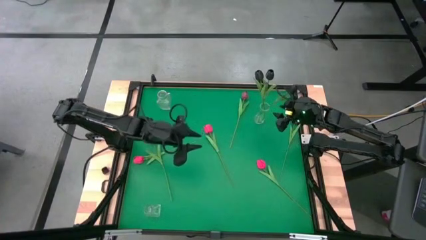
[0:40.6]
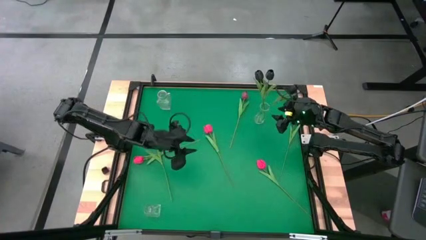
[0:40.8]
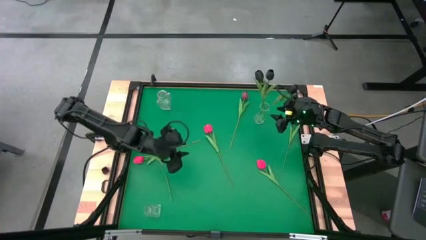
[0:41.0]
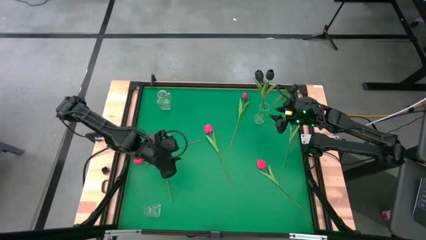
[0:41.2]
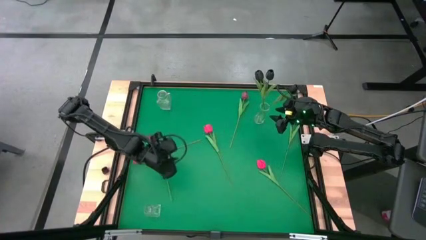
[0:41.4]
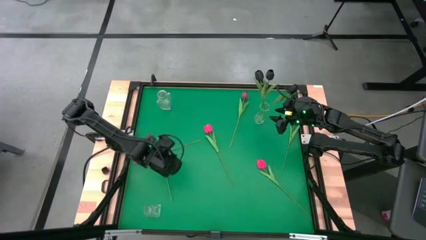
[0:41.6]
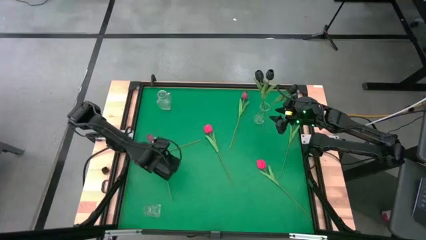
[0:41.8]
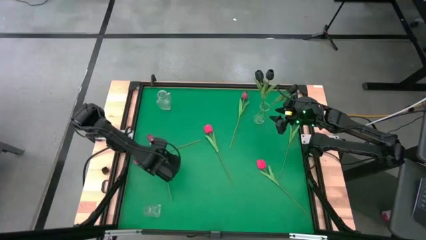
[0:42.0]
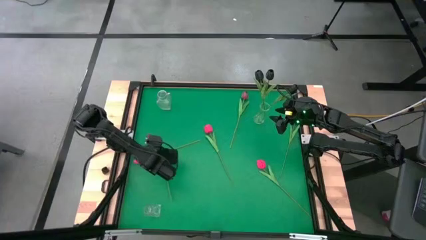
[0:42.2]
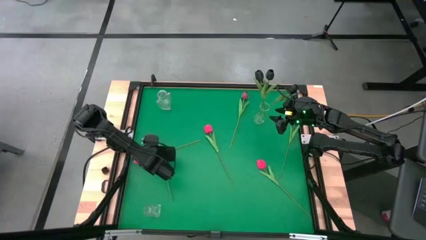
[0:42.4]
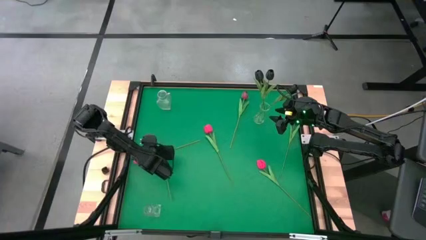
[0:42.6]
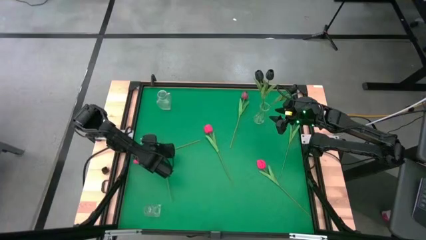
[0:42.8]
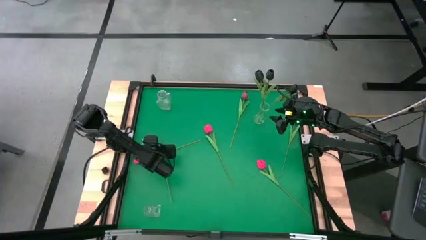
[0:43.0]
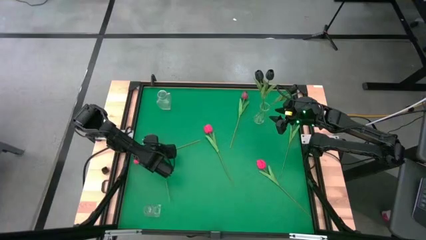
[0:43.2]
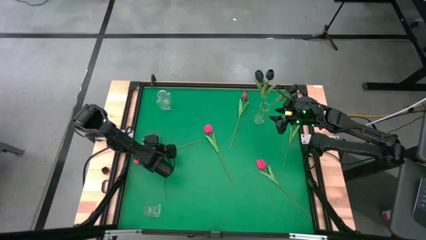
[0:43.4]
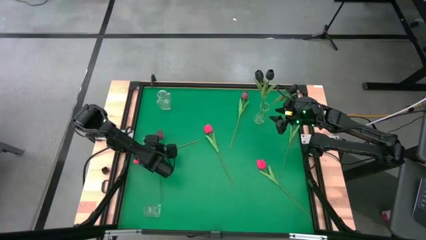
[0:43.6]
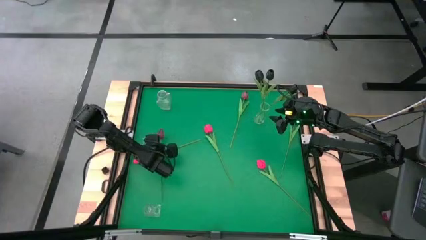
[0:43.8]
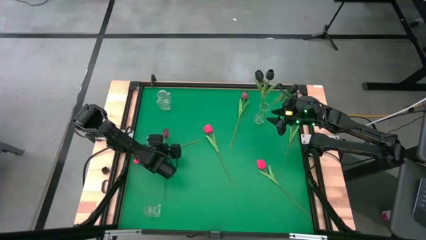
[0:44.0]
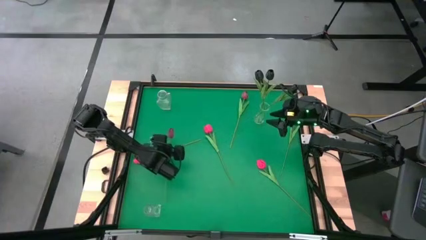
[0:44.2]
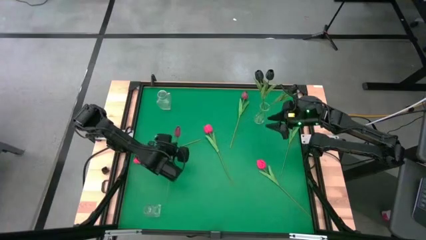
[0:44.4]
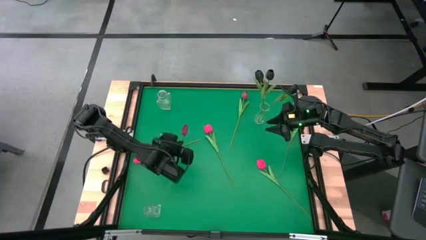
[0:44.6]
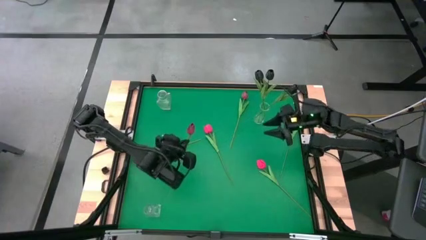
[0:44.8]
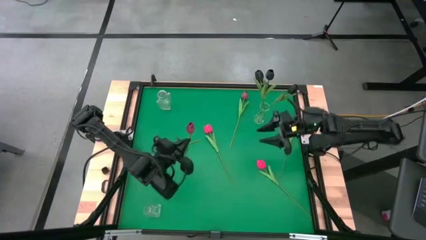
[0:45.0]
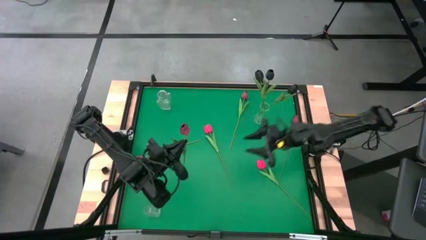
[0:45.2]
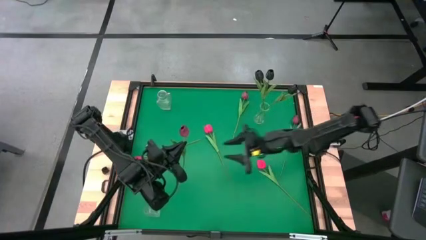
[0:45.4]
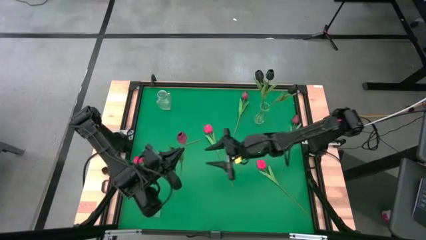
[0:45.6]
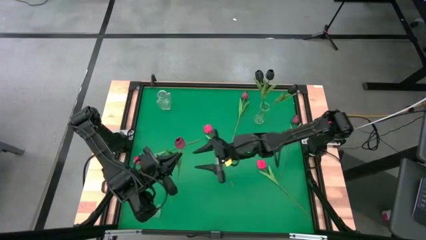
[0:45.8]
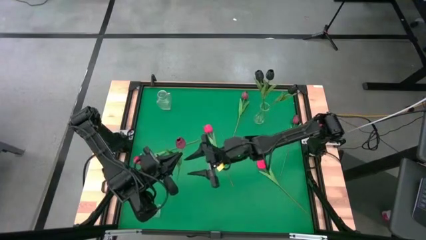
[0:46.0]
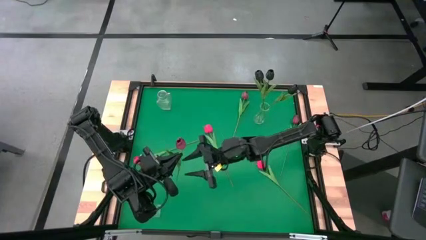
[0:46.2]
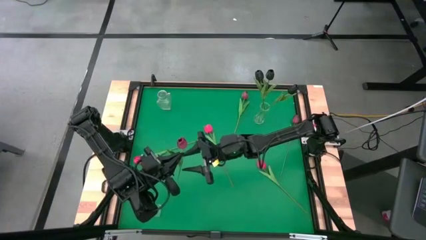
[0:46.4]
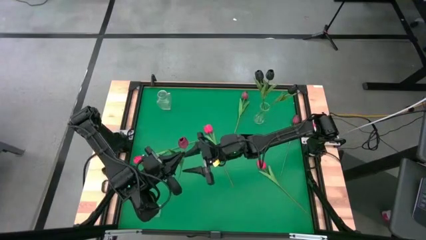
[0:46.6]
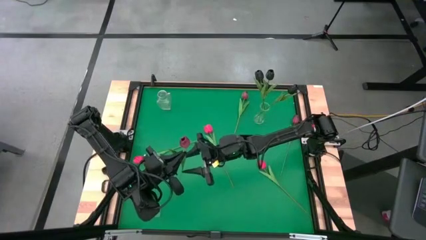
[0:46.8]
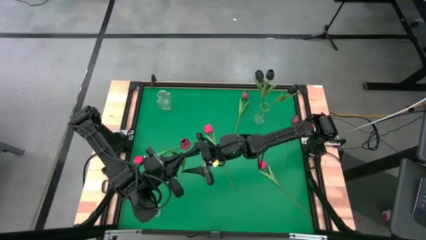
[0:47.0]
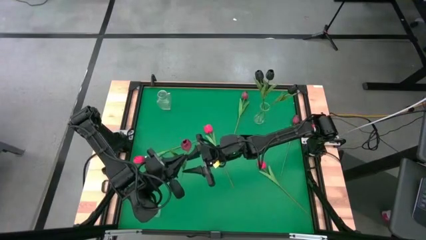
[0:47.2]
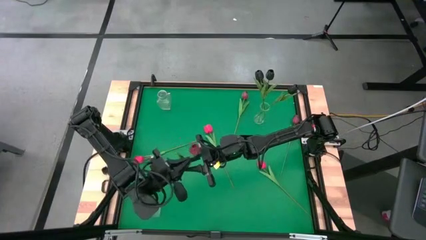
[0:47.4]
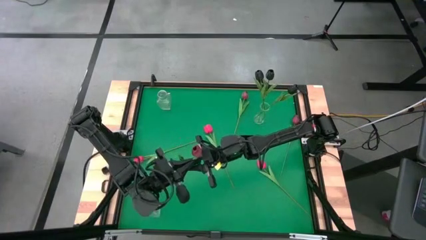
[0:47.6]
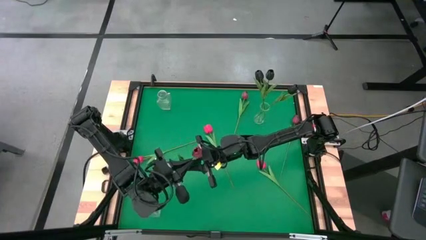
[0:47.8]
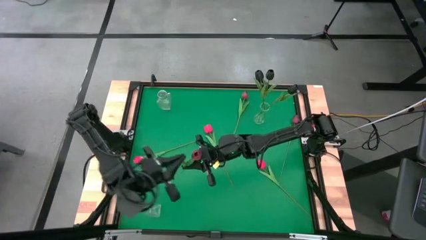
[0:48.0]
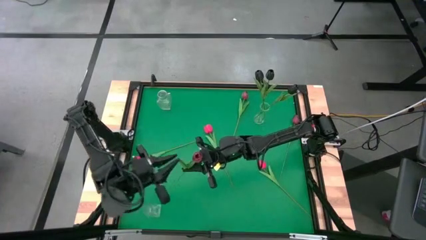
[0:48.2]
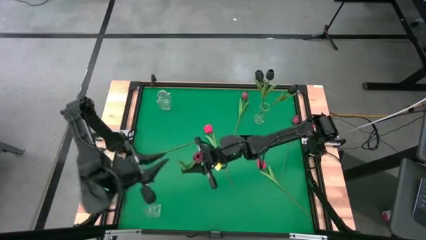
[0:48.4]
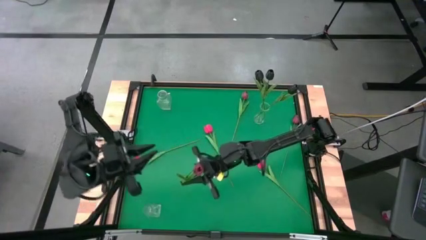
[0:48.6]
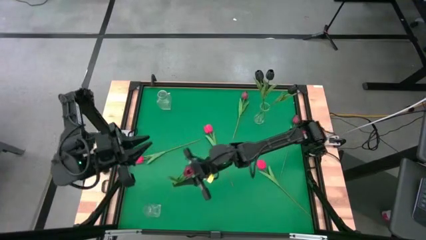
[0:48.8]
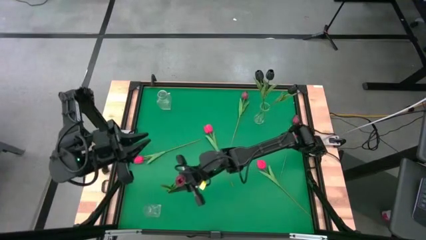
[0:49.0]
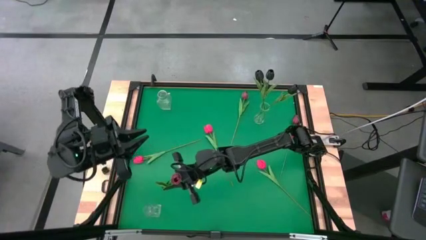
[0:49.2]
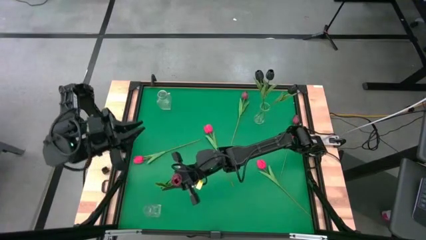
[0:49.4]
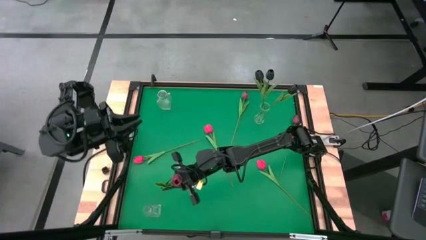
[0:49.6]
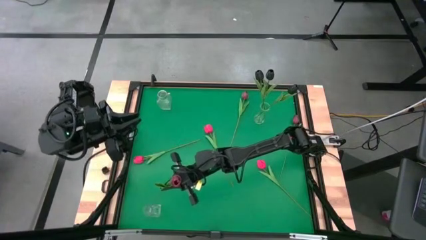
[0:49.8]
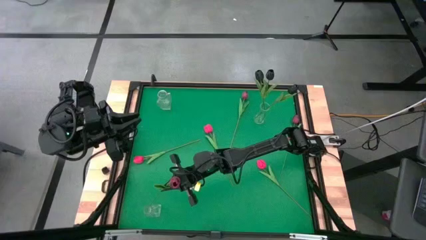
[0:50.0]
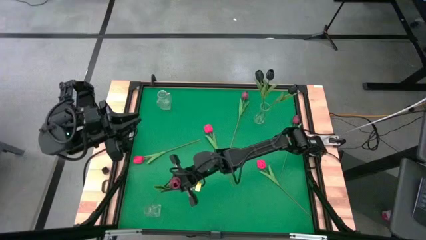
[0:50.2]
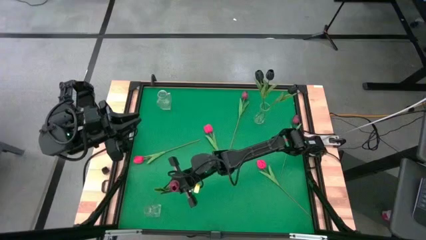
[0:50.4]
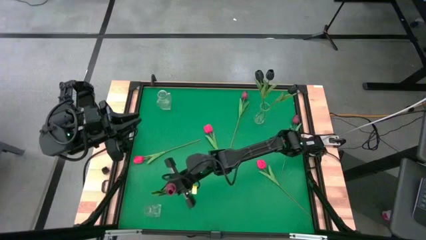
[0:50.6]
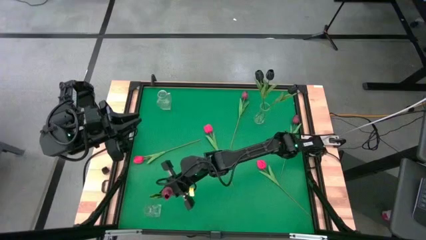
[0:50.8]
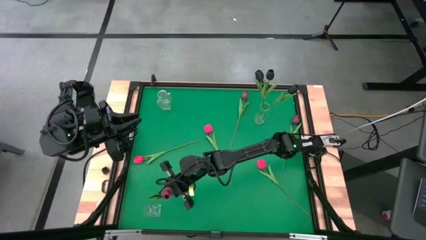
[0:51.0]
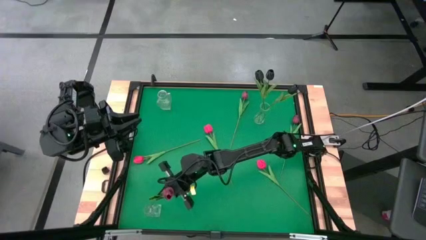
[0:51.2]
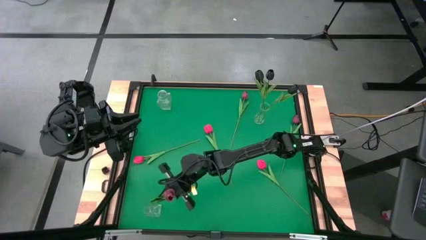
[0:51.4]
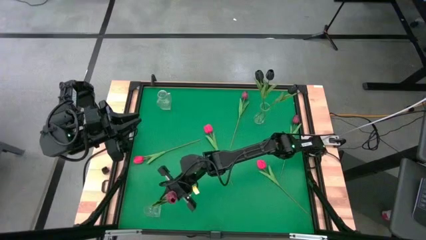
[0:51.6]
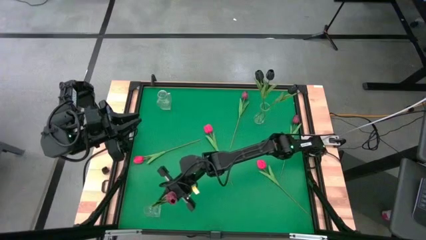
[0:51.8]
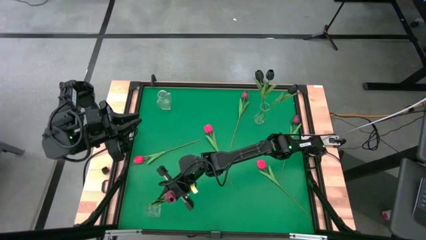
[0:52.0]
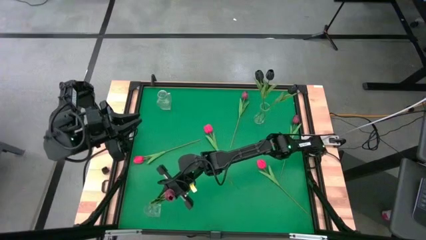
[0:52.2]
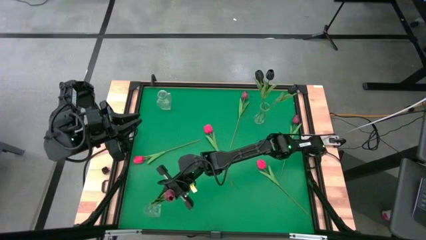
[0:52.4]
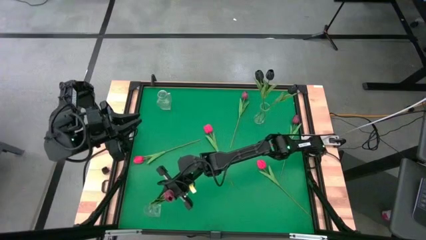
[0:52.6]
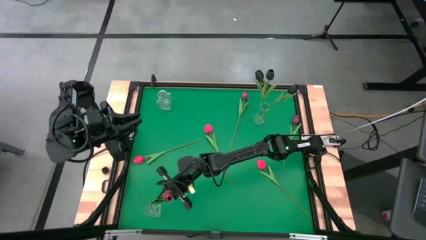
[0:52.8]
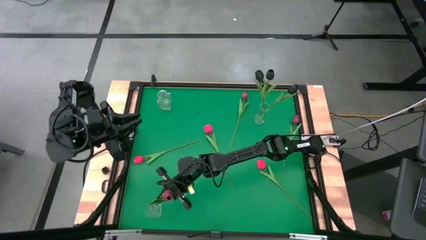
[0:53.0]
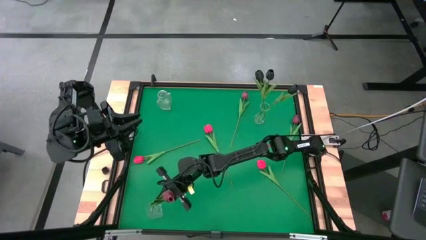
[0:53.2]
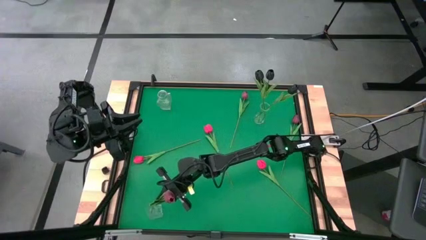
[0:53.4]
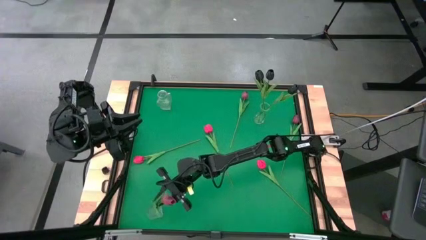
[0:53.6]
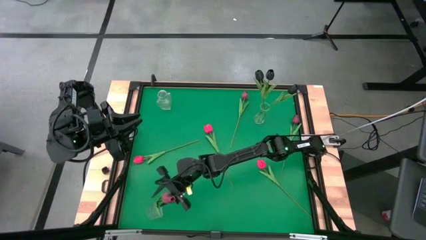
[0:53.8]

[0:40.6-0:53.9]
Task: Sort flowers into vase by color
Put the bottom dark red flower into the bottom transparent vase
